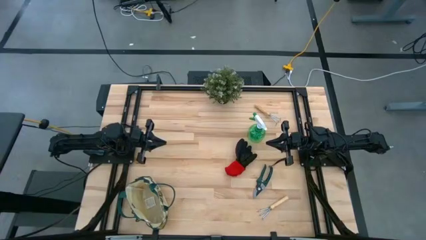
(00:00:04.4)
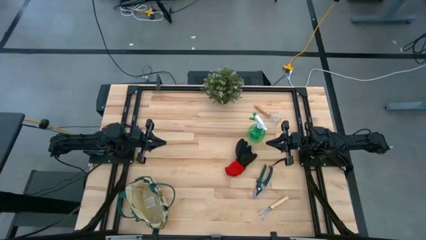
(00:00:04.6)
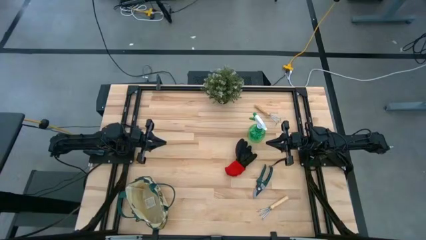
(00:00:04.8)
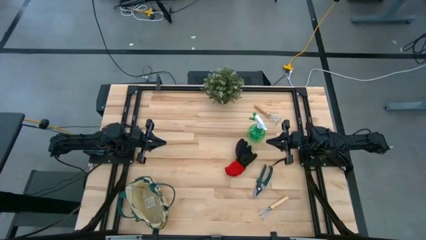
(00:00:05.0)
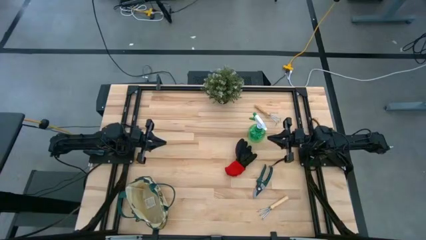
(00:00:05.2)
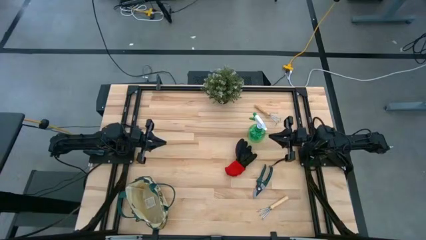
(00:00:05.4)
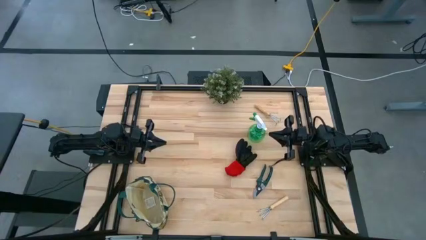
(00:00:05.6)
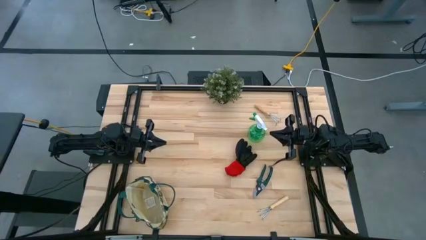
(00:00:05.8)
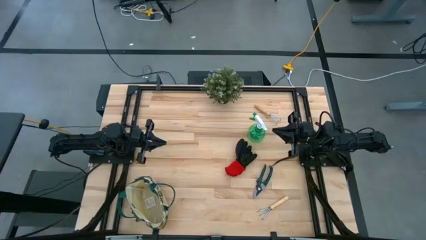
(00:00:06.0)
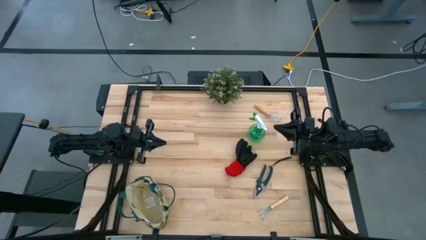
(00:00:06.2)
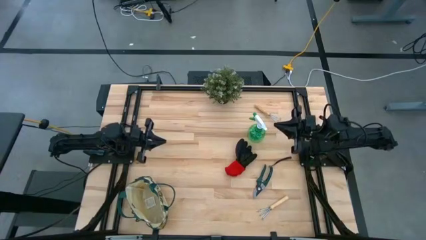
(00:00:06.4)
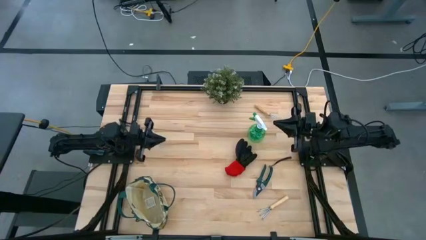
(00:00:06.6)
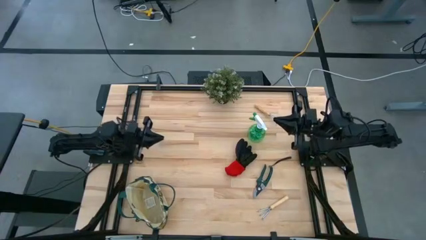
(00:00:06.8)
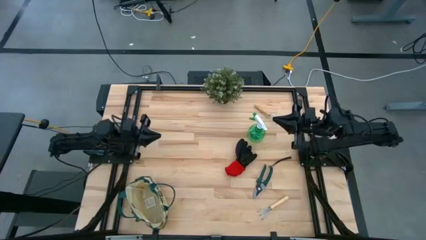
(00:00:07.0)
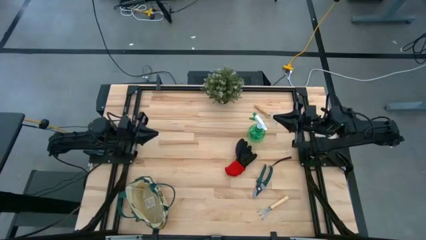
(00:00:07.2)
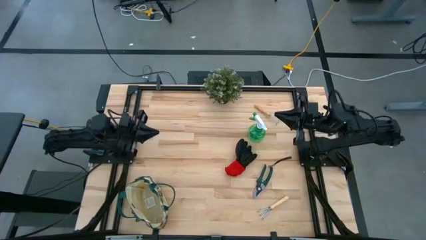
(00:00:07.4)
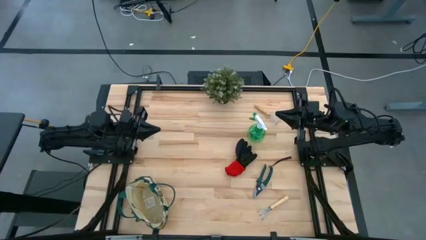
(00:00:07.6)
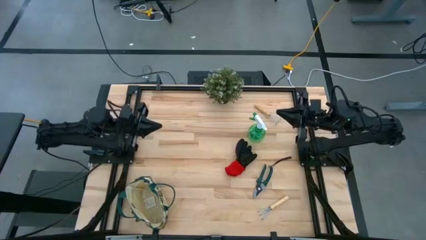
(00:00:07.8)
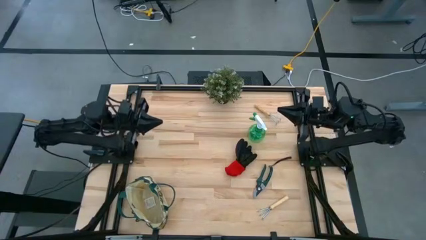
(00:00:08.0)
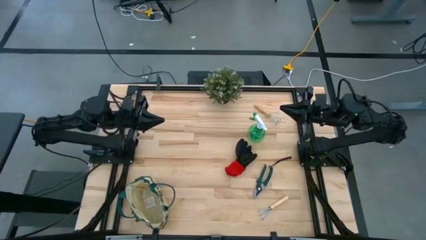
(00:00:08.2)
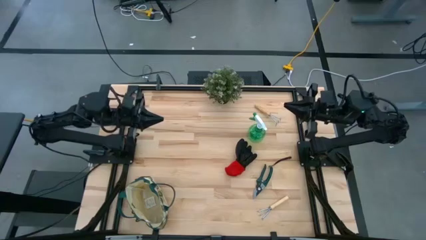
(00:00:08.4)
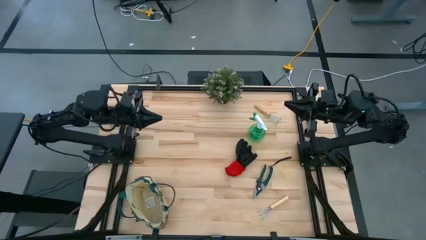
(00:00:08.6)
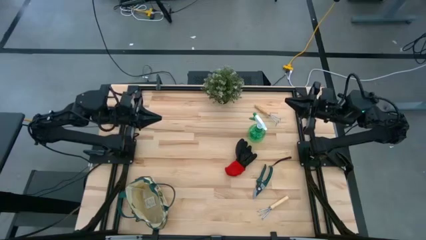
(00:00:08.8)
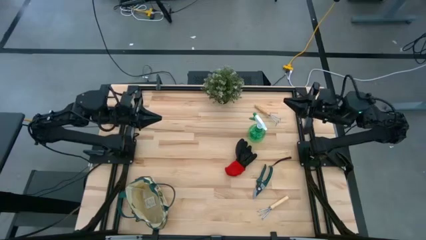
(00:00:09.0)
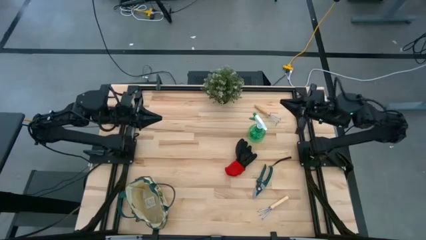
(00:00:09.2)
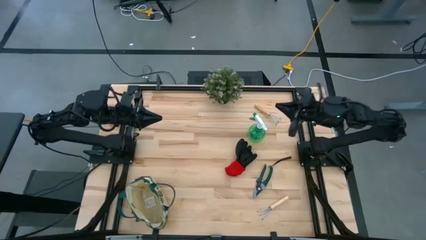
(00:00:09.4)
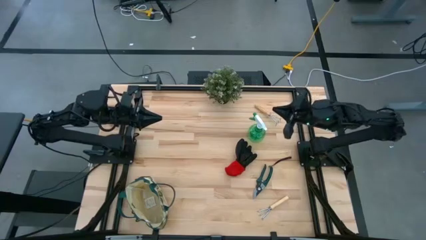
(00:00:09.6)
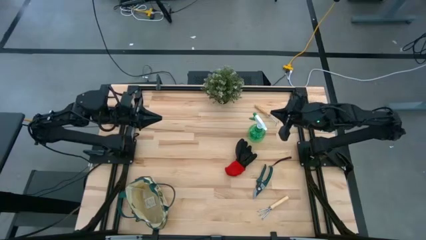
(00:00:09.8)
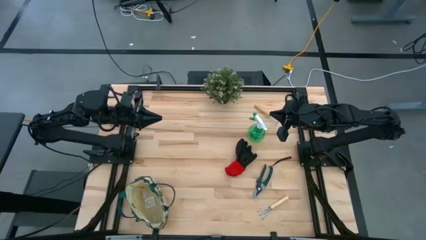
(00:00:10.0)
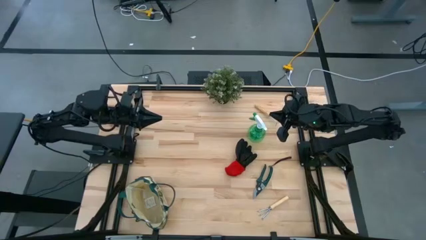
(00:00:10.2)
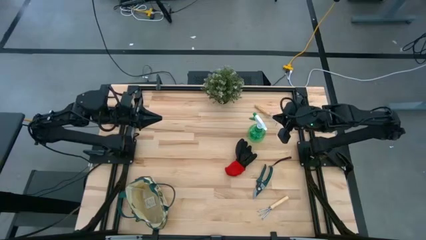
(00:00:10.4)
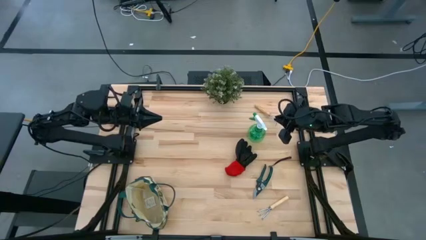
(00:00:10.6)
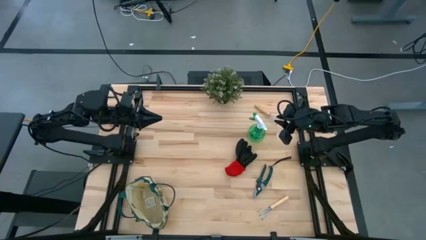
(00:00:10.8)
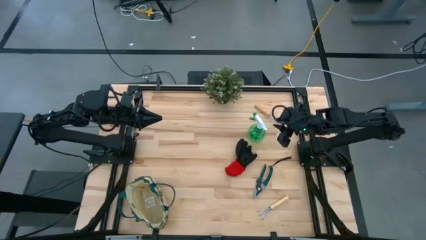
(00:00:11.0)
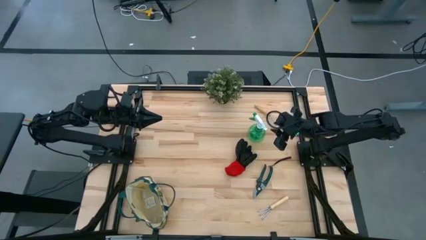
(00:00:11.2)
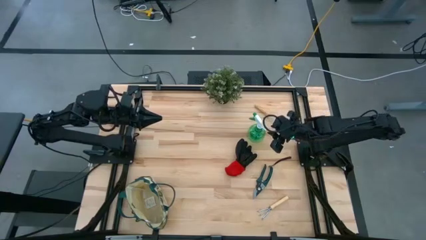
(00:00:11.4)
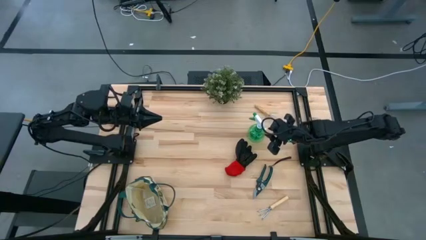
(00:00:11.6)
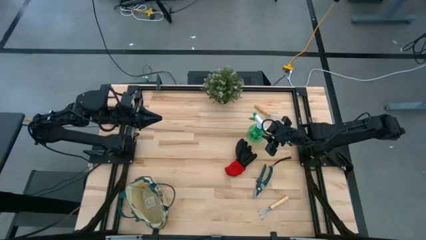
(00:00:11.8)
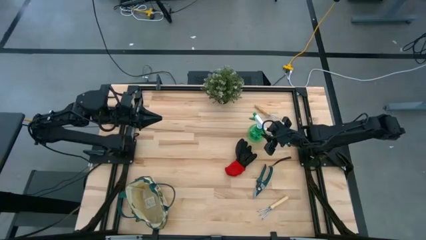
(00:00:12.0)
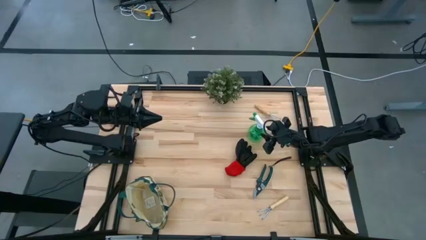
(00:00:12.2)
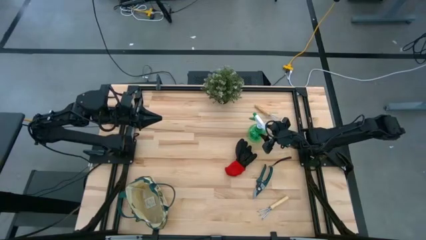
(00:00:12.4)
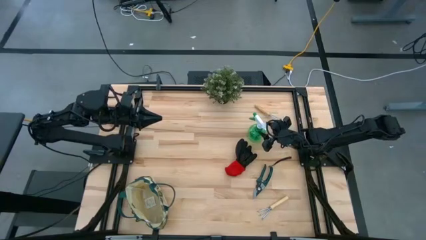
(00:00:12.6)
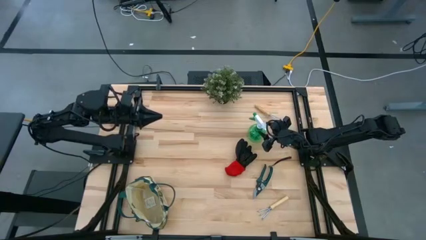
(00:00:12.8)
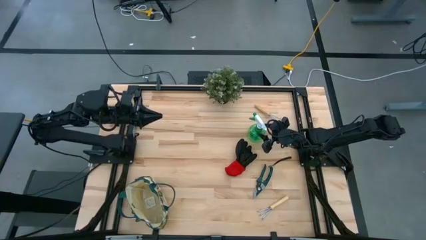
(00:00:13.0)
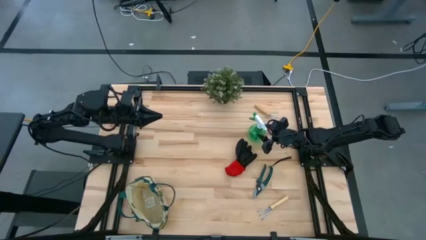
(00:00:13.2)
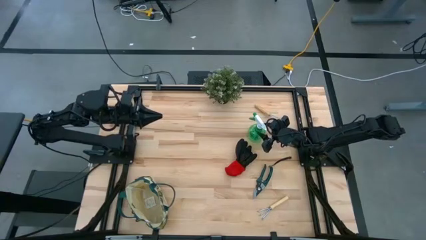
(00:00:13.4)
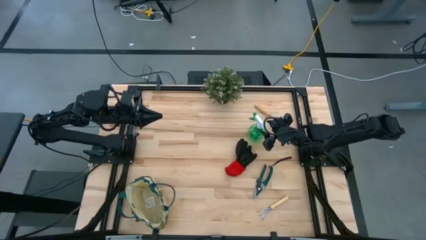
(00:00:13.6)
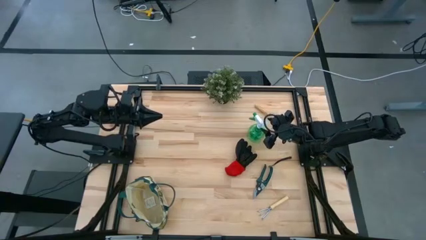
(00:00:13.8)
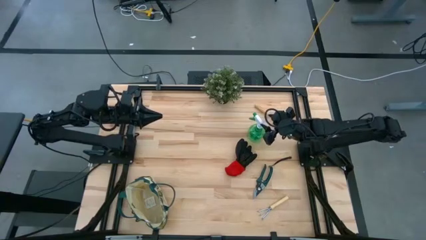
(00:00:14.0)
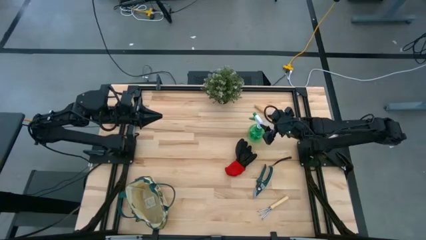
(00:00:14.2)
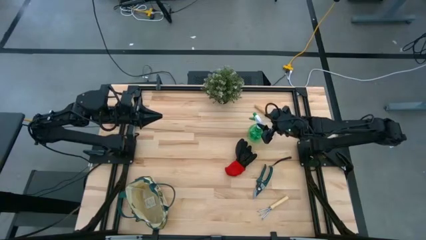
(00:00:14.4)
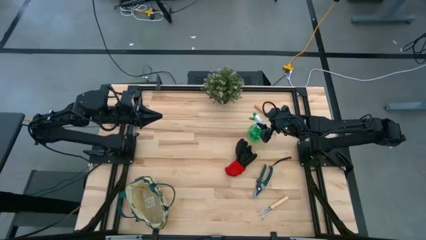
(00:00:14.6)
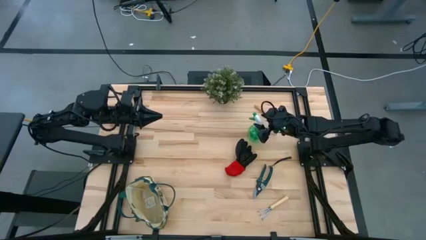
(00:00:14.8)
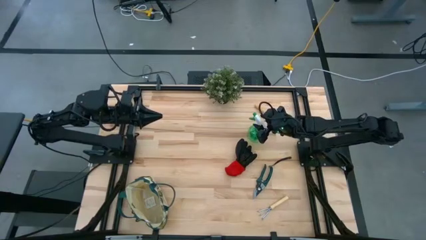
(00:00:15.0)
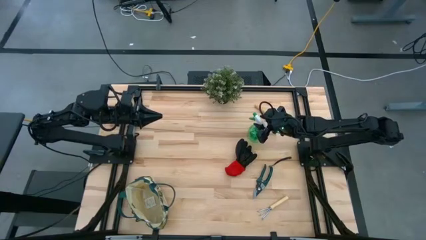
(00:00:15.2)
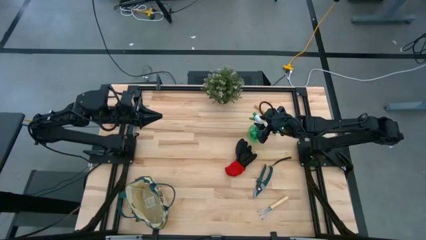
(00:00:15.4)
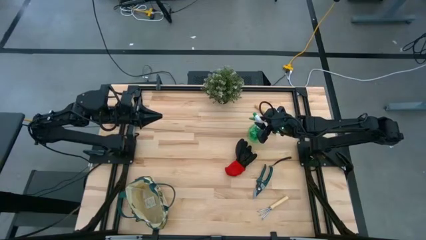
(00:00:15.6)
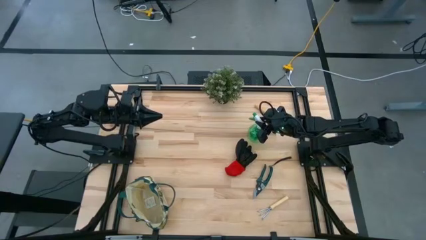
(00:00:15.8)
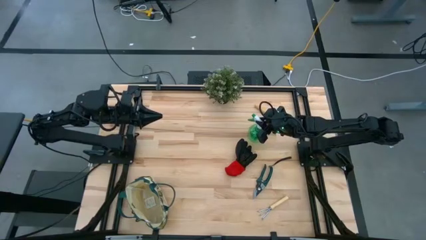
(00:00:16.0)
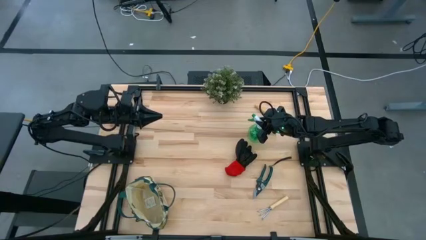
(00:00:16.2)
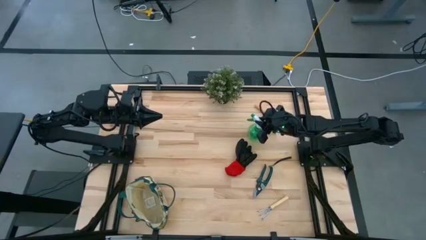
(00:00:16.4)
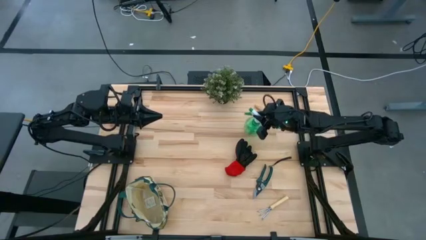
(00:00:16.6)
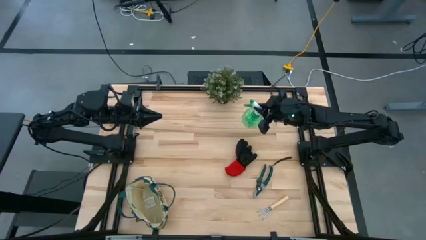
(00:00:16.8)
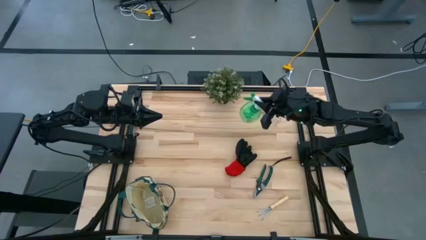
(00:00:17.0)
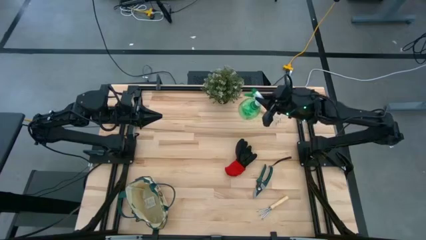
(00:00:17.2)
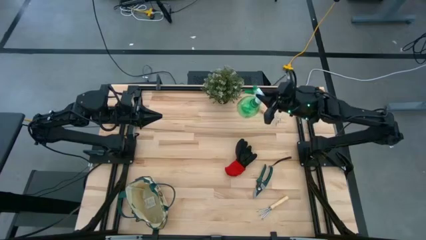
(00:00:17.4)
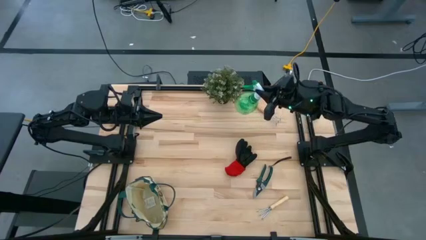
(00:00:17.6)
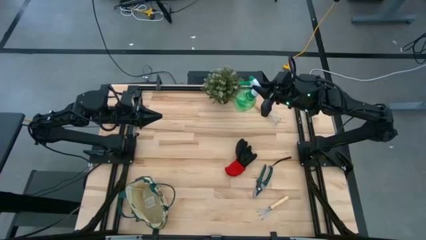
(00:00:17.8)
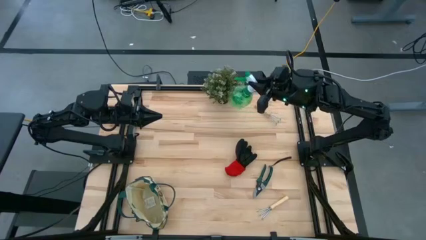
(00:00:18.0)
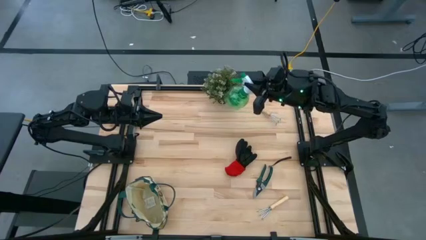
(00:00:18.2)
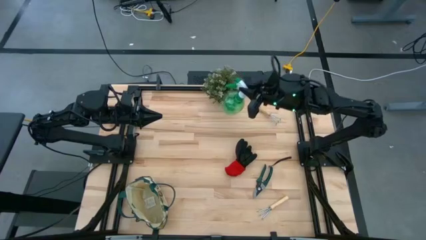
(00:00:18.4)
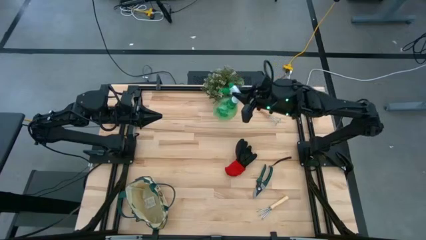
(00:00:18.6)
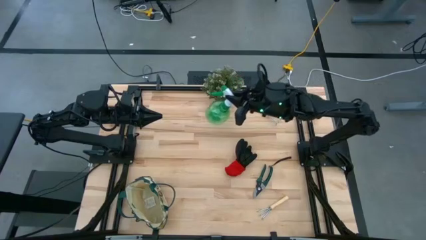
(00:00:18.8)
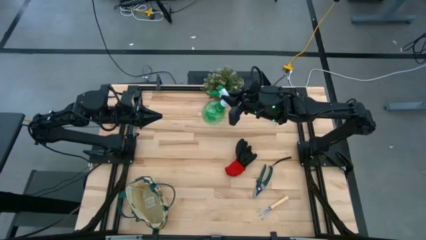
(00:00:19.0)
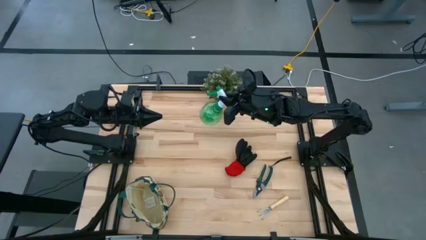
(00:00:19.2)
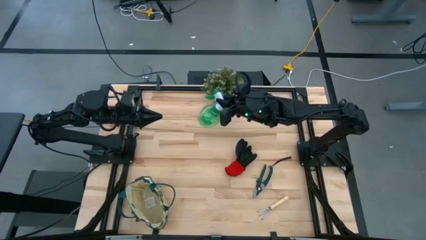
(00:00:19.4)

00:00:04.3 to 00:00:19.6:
Task: Pick & Place Garden tools in Gardening bag
Put the green spray bottle into the gardening bag
